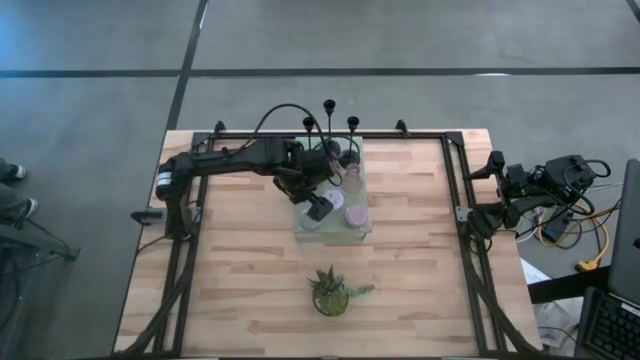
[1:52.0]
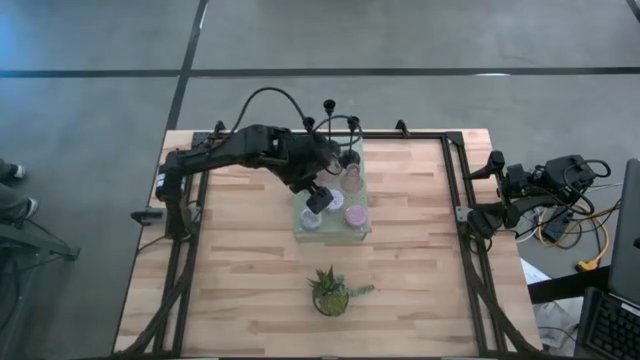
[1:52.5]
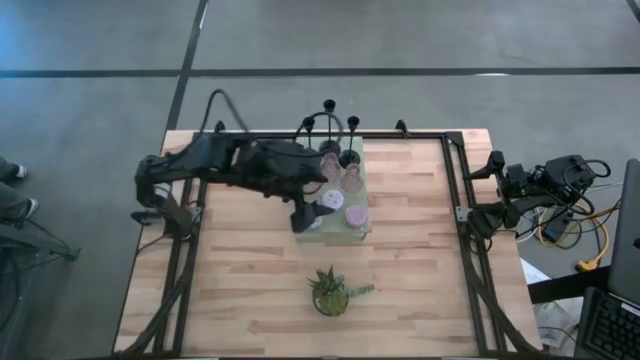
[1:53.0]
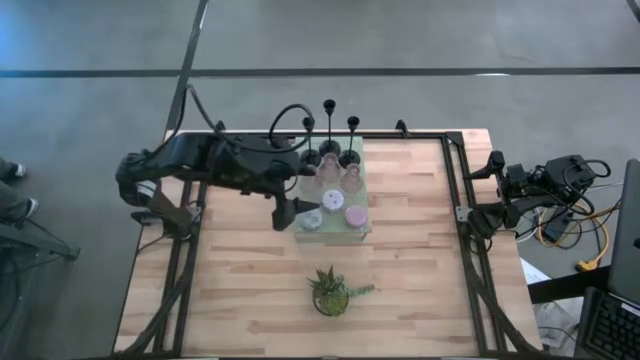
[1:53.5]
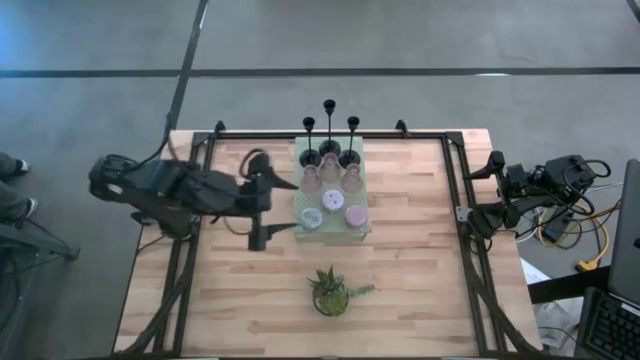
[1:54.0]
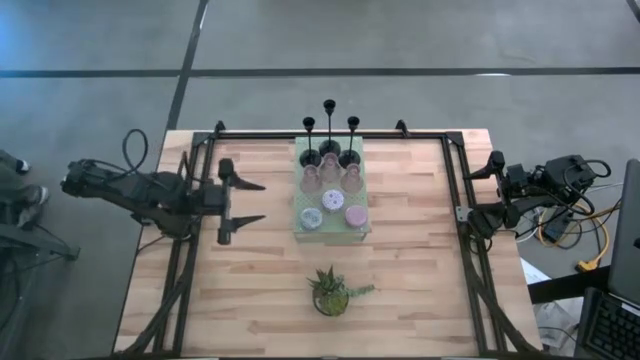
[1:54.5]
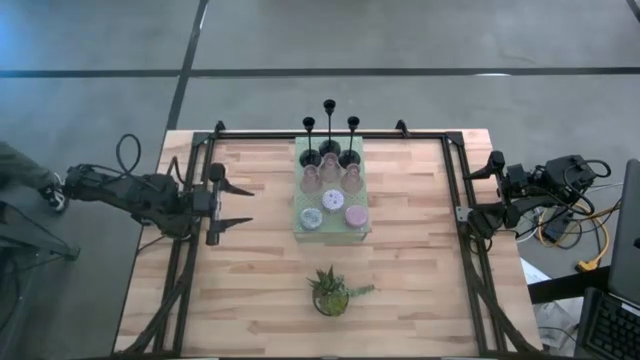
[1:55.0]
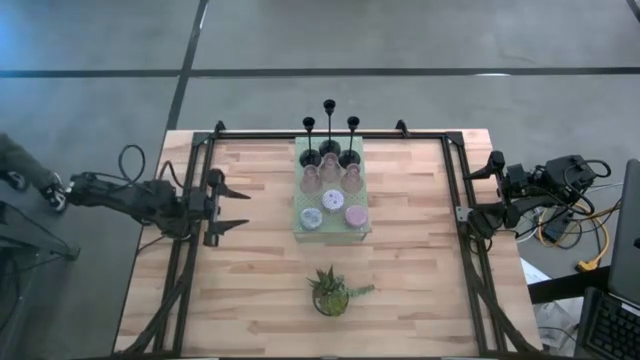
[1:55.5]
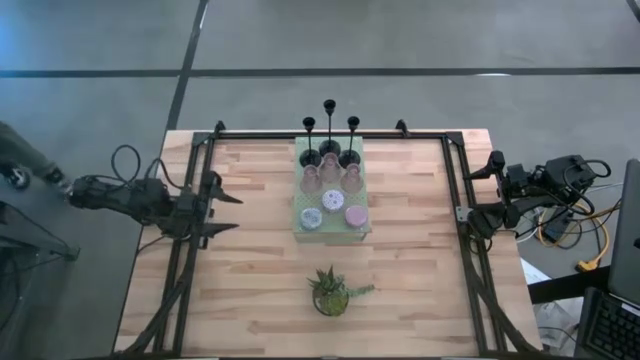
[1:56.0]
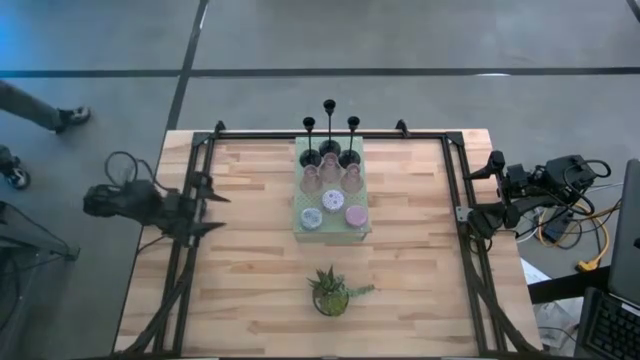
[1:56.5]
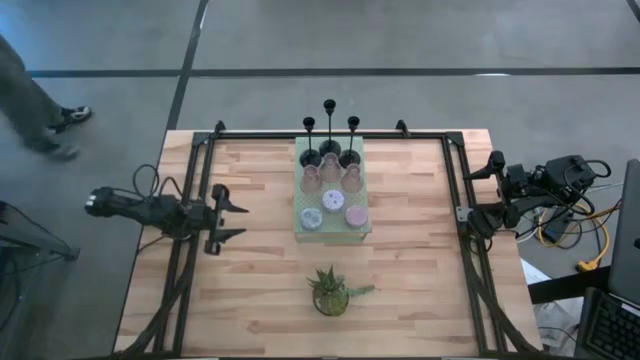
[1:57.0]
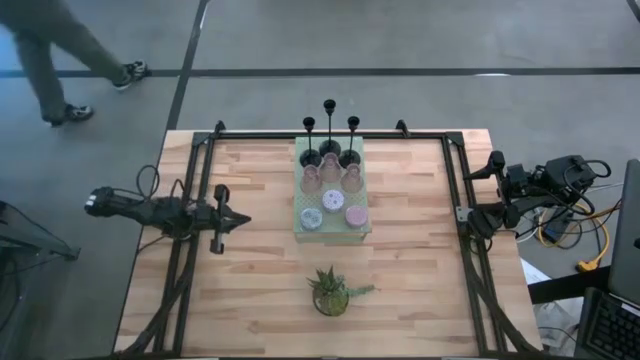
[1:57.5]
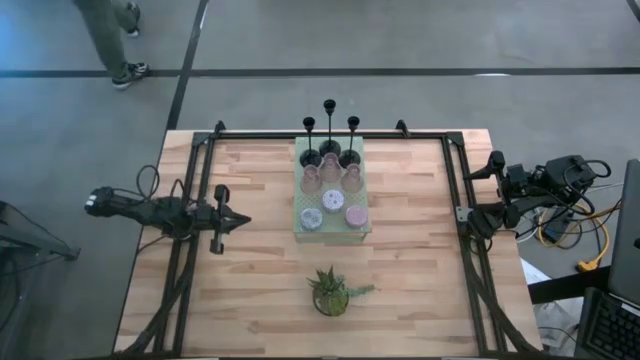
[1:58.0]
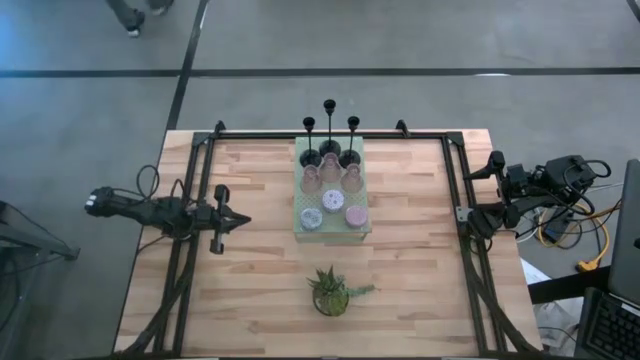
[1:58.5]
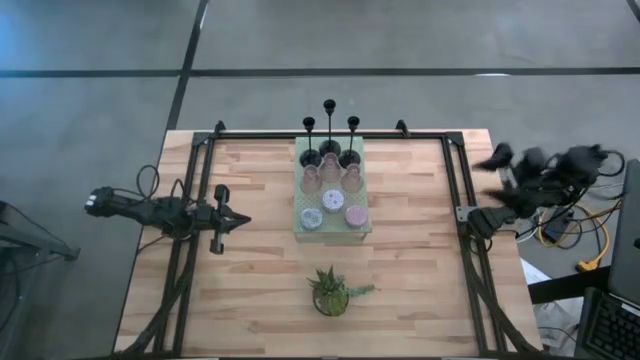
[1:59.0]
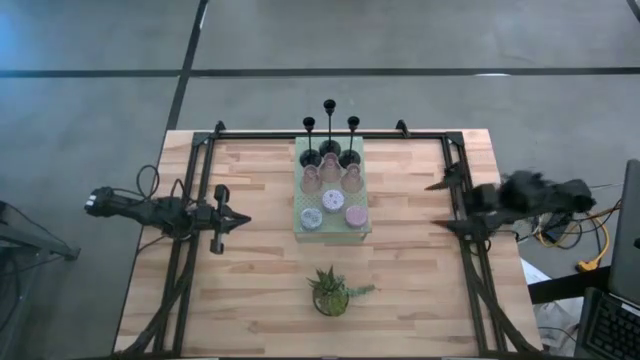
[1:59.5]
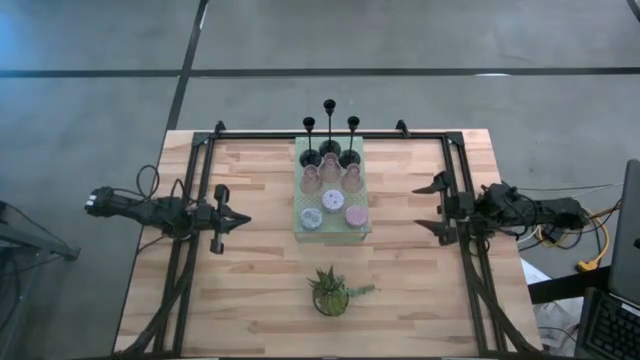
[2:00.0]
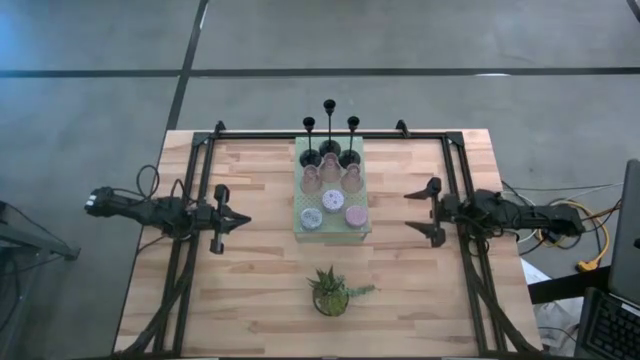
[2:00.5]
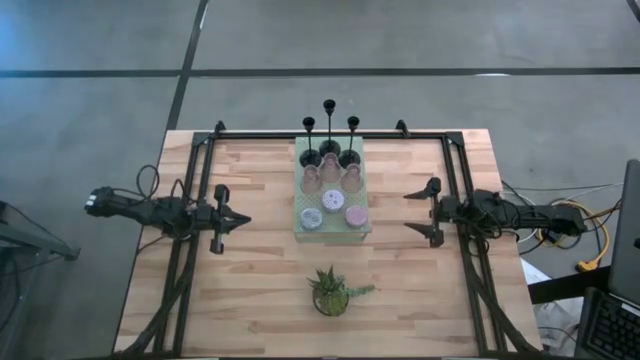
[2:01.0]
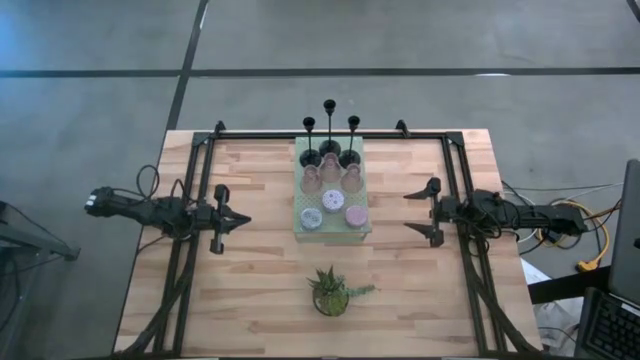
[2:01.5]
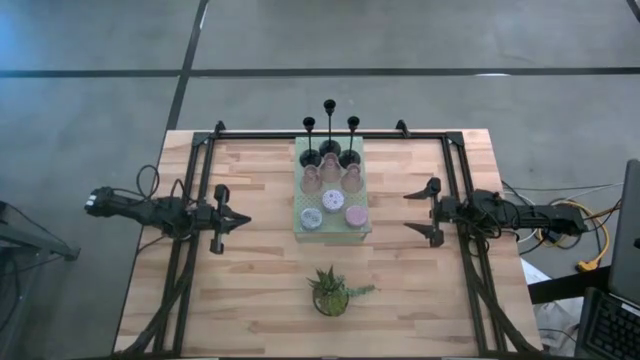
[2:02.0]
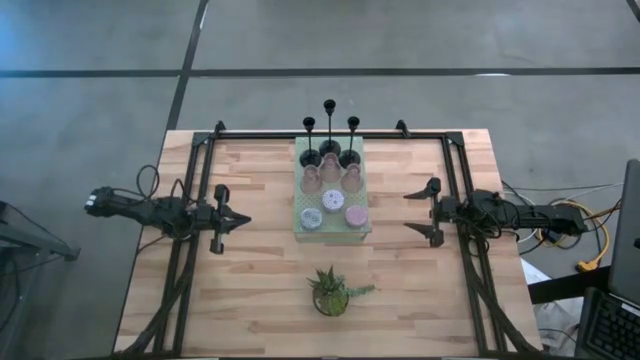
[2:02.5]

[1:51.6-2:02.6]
Task: Pick & Place candle stick holders
Return to Home Position

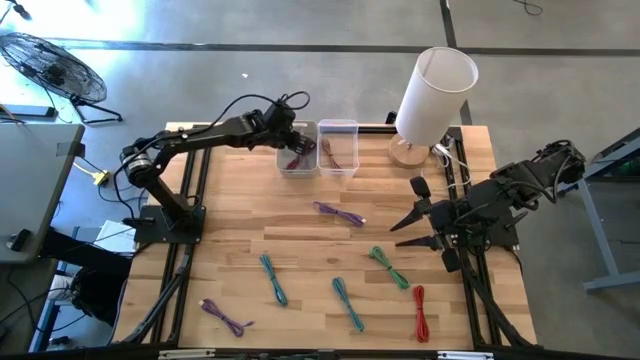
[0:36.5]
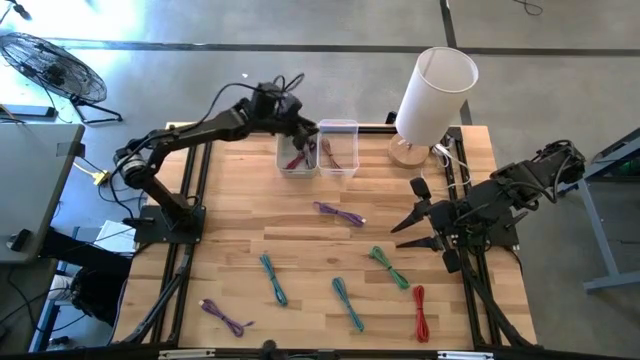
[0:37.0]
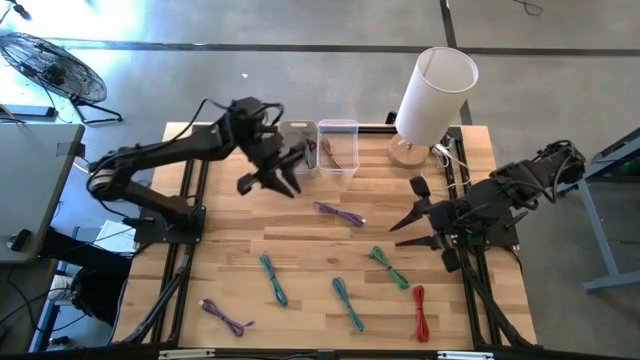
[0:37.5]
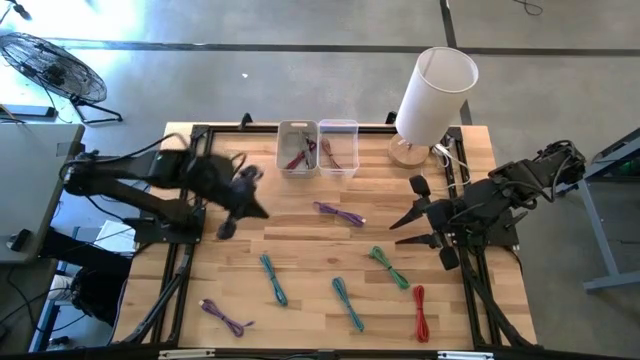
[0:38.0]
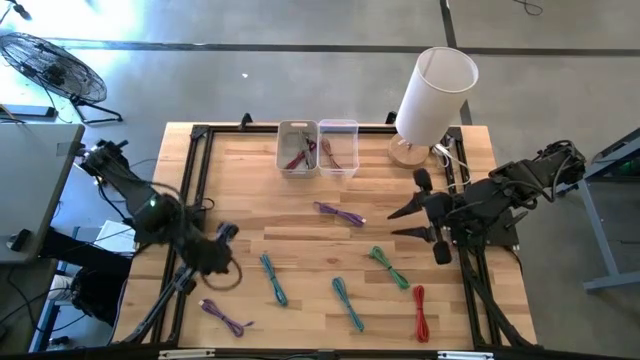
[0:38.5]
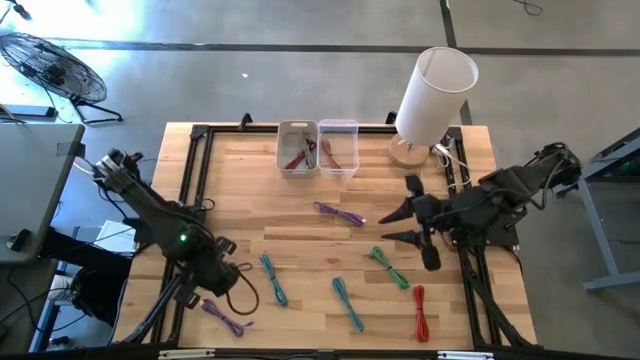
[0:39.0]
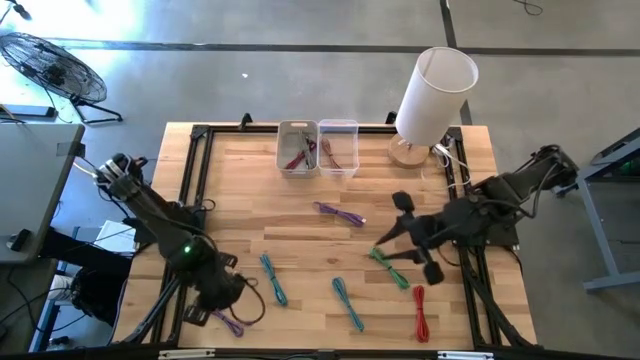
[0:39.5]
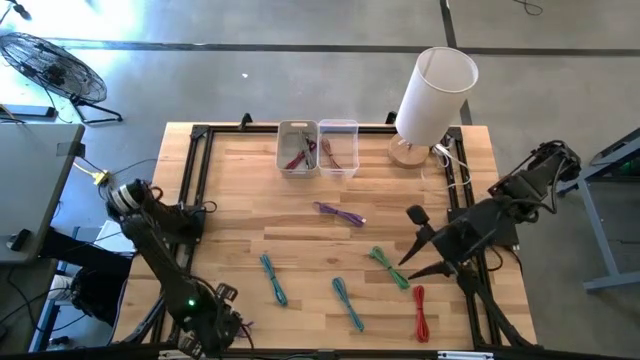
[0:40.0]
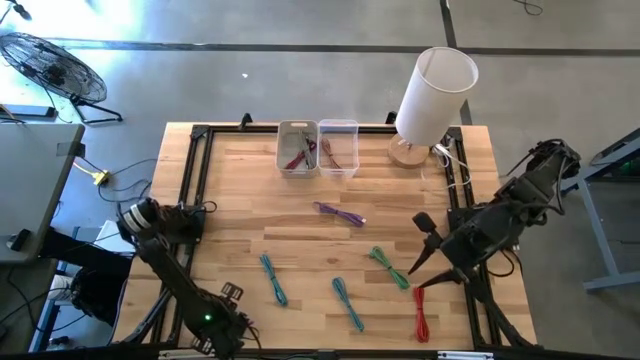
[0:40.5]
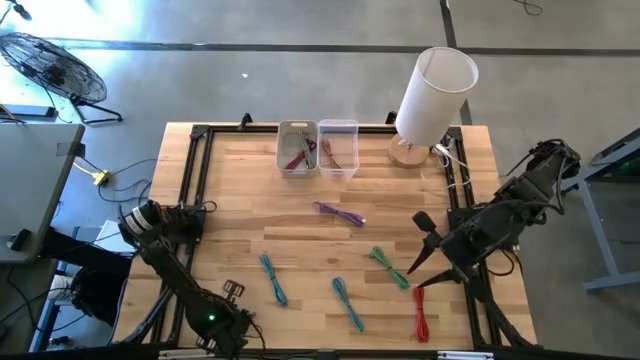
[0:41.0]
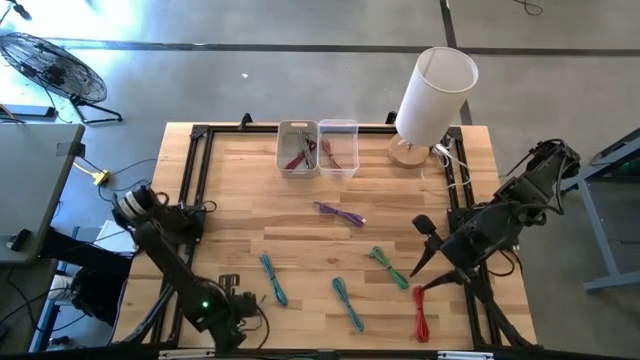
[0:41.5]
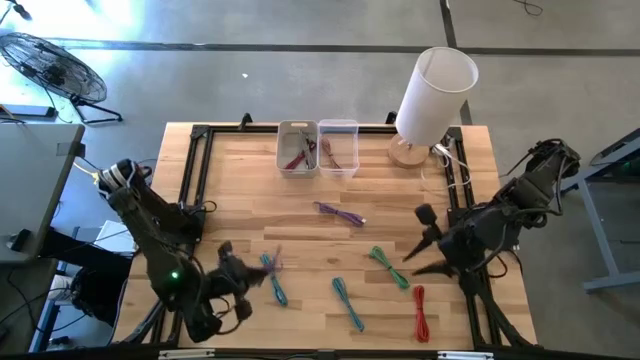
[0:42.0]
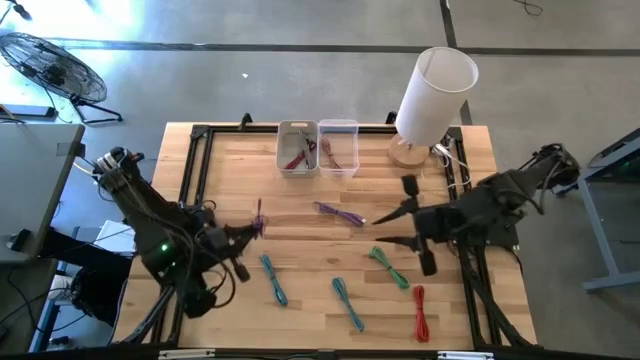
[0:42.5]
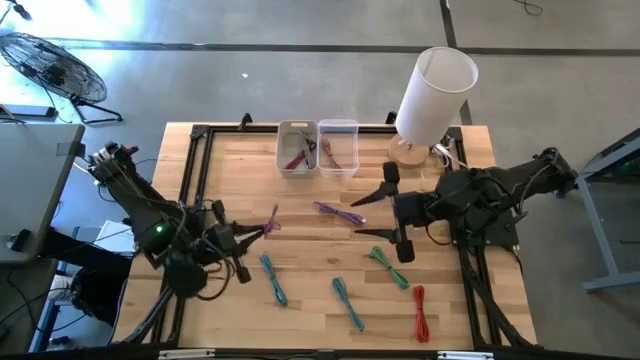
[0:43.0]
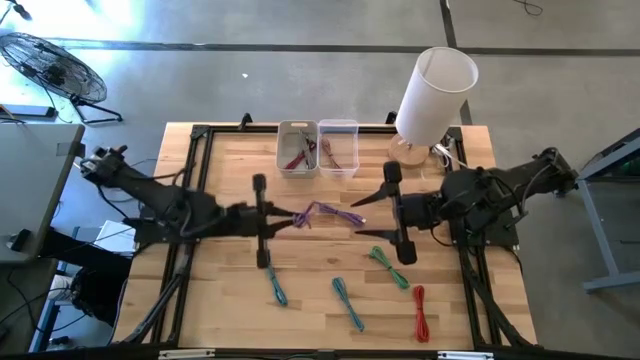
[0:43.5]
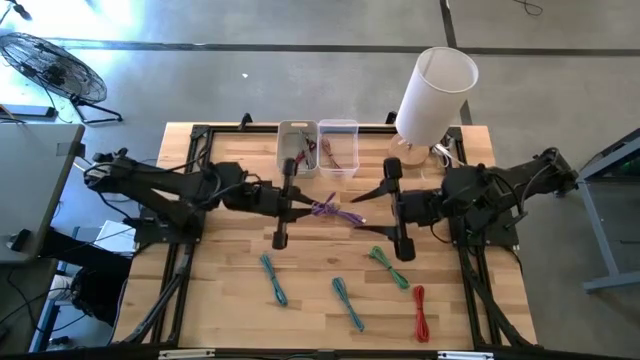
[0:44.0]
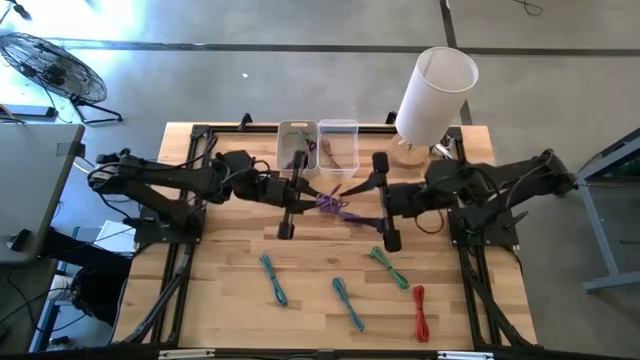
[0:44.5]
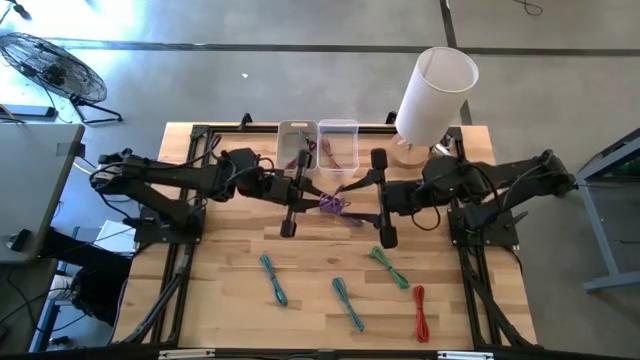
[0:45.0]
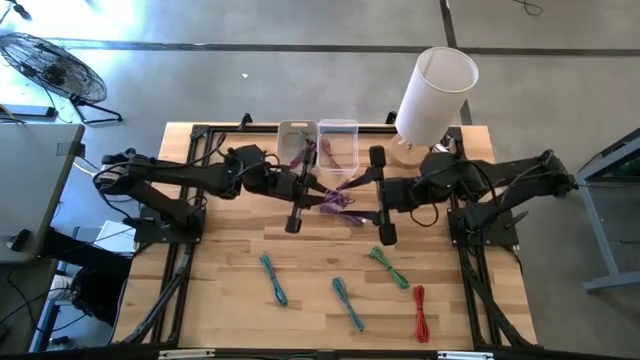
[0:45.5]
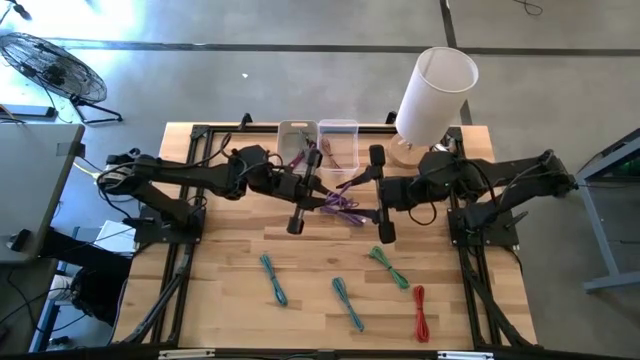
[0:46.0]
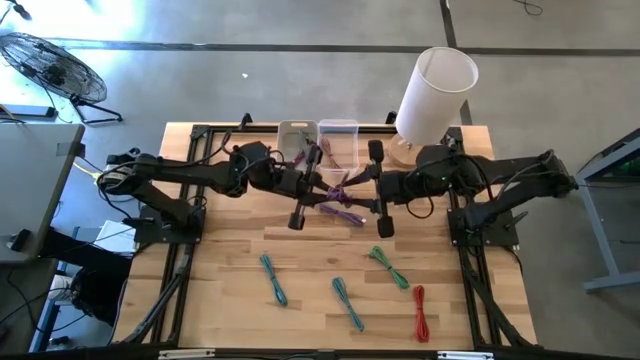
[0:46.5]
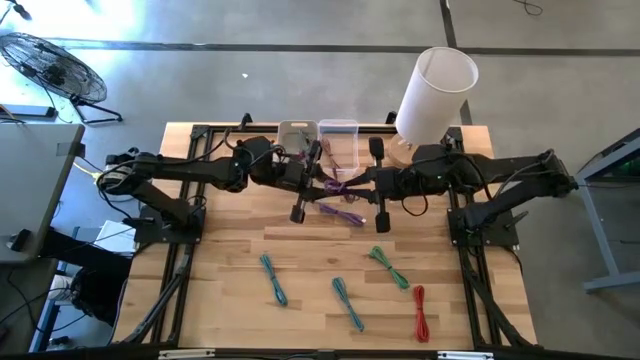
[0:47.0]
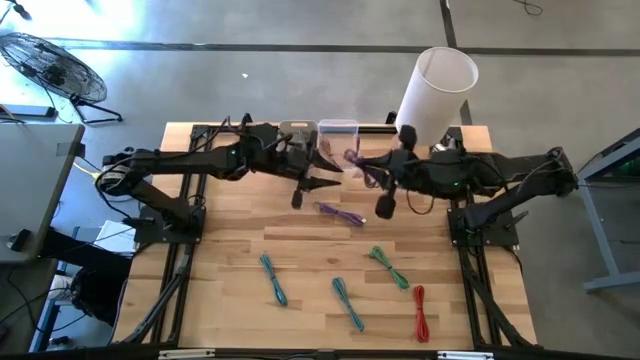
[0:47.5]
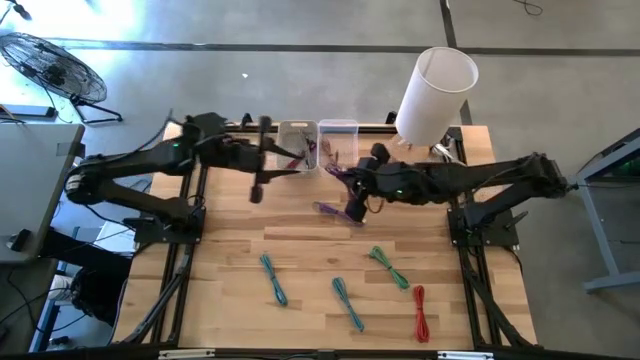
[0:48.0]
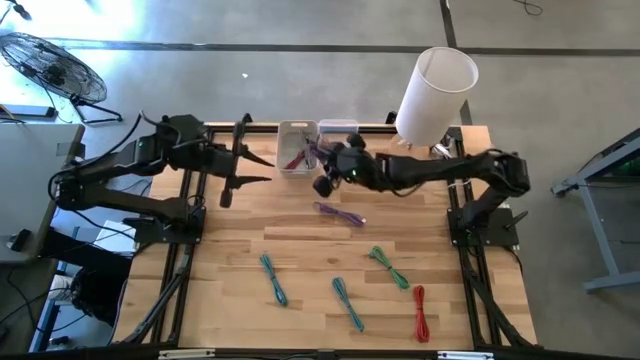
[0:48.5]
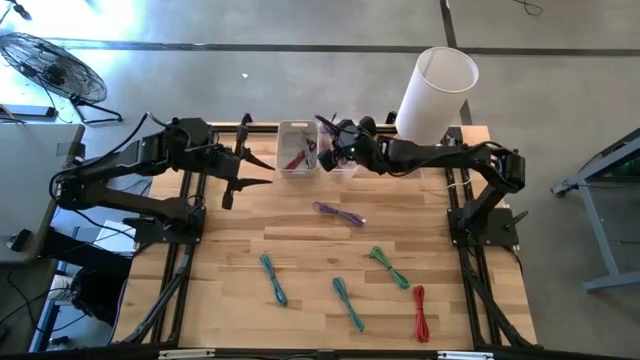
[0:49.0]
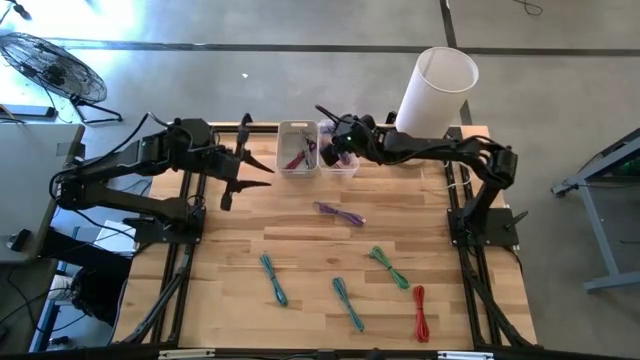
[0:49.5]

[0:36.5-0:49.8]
Task: Pick & Place USB Port
Put the bottom violet USB cable into the transparent bin
